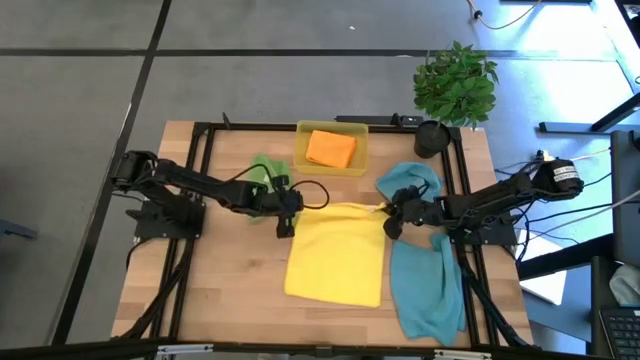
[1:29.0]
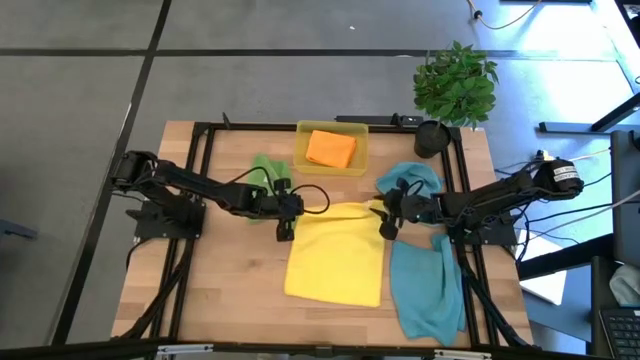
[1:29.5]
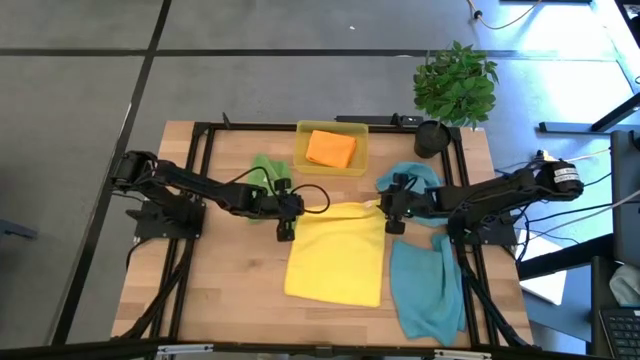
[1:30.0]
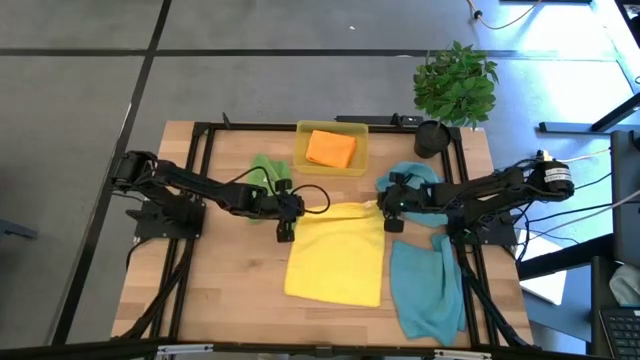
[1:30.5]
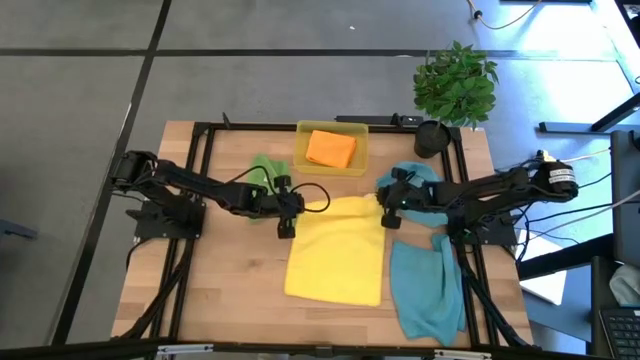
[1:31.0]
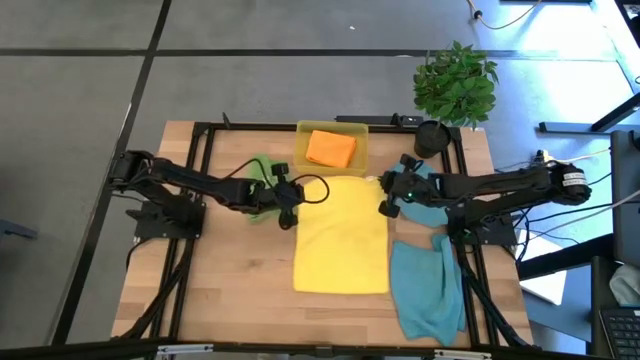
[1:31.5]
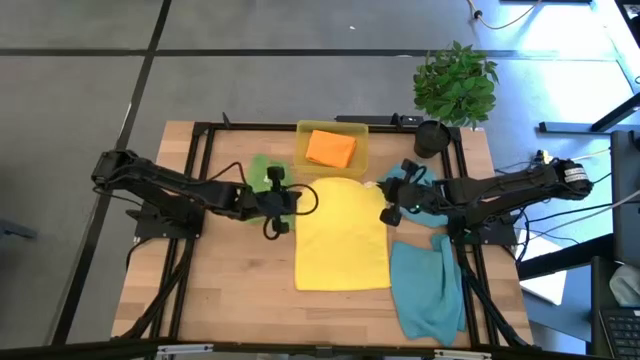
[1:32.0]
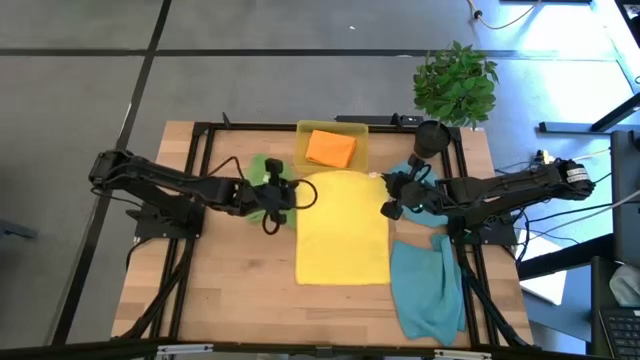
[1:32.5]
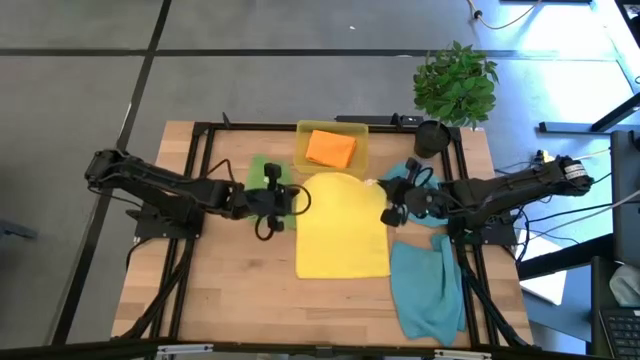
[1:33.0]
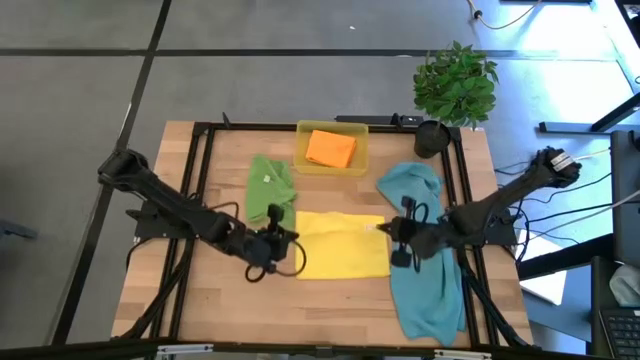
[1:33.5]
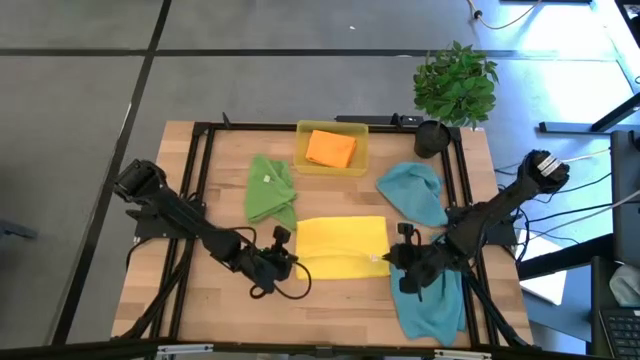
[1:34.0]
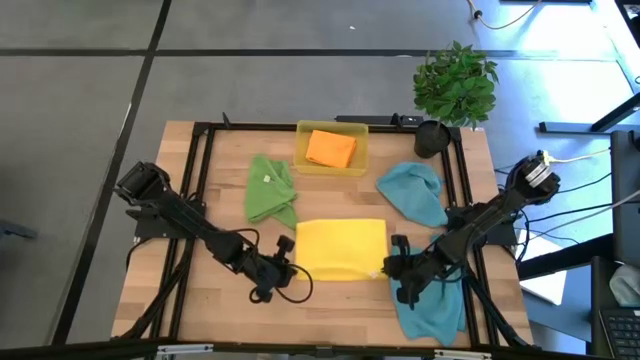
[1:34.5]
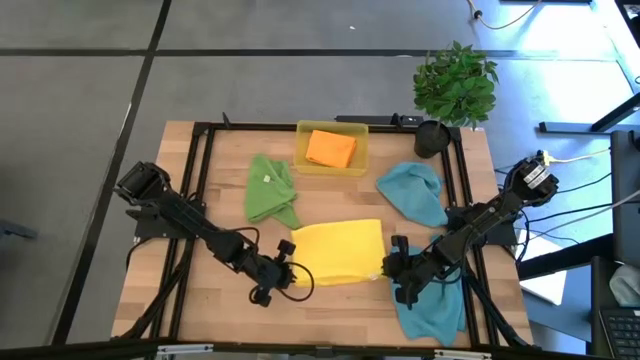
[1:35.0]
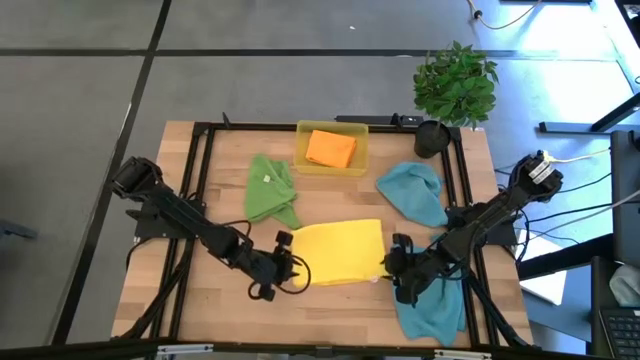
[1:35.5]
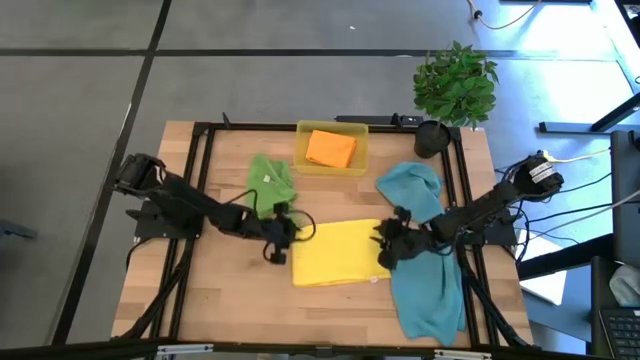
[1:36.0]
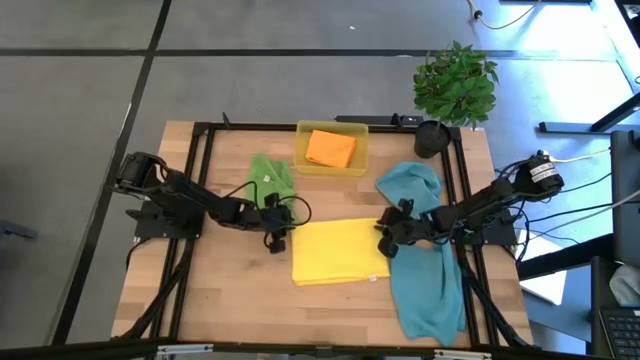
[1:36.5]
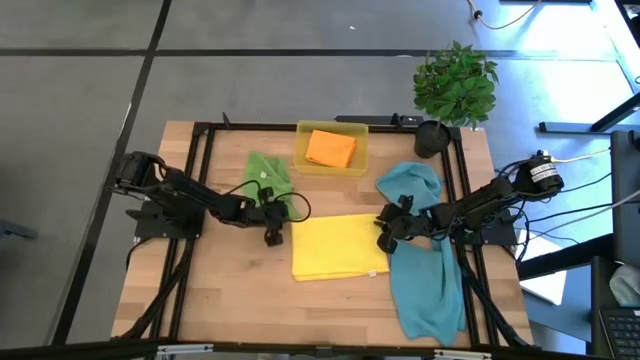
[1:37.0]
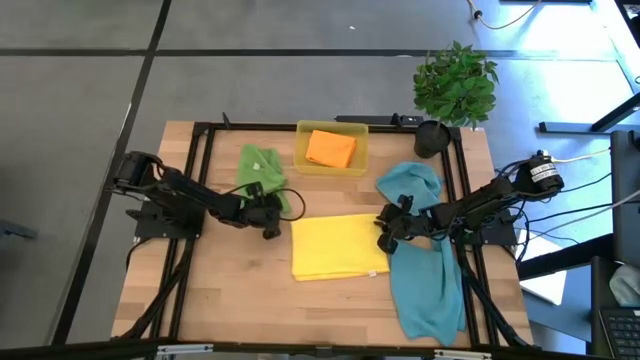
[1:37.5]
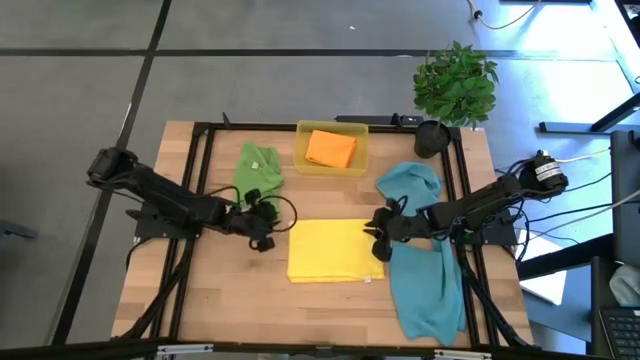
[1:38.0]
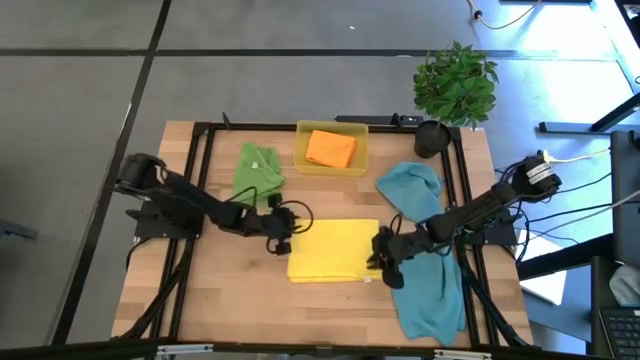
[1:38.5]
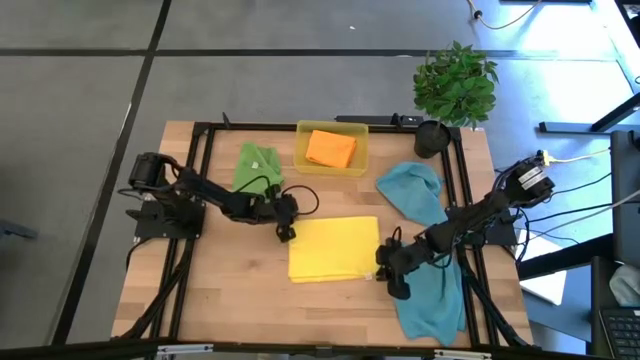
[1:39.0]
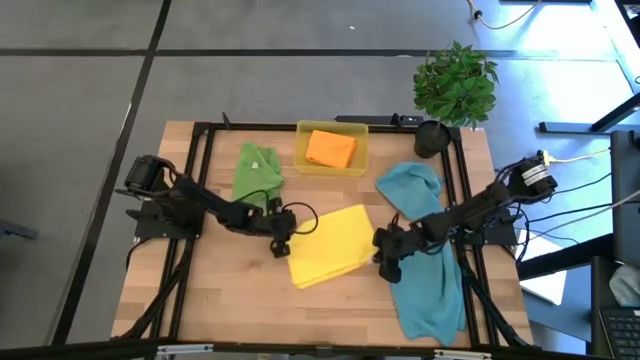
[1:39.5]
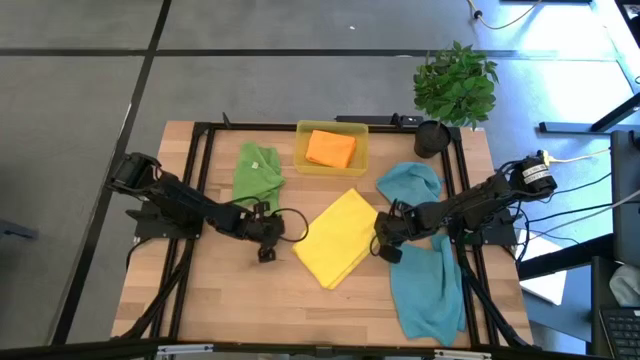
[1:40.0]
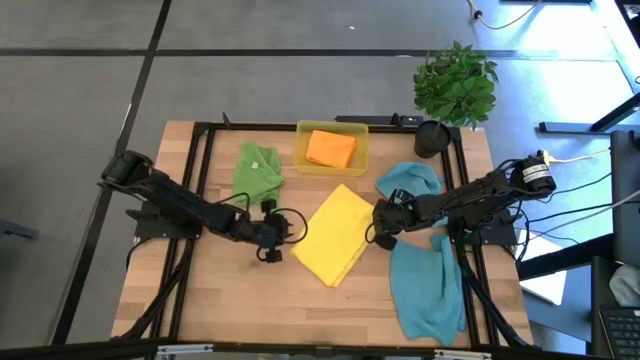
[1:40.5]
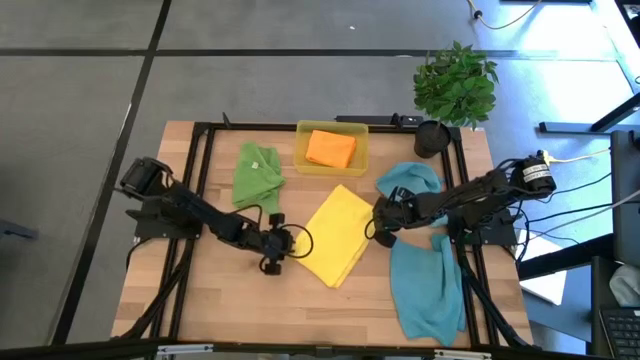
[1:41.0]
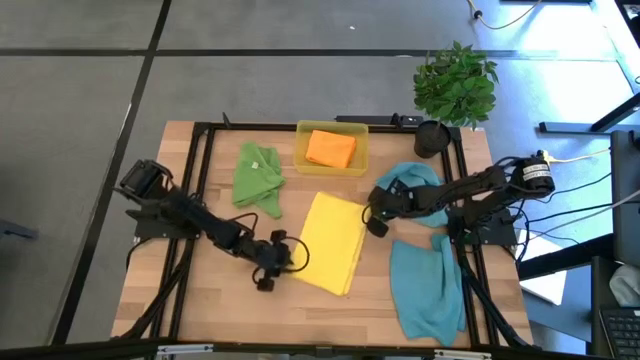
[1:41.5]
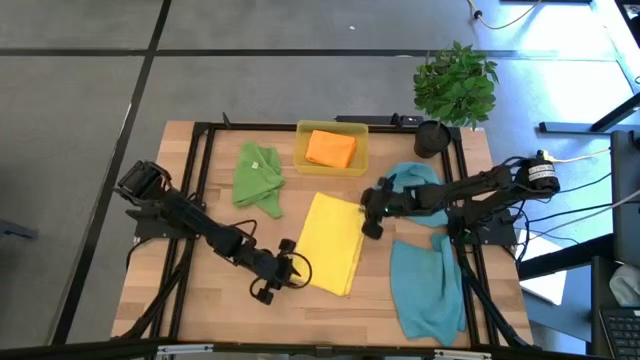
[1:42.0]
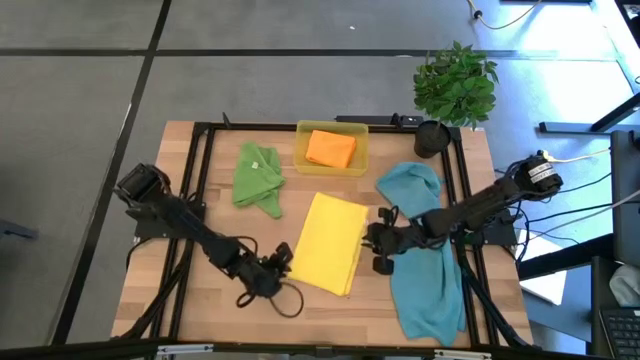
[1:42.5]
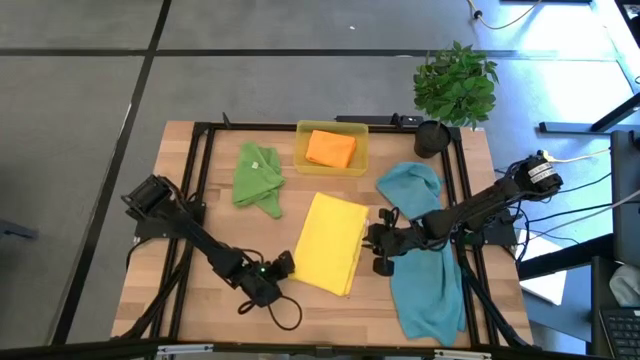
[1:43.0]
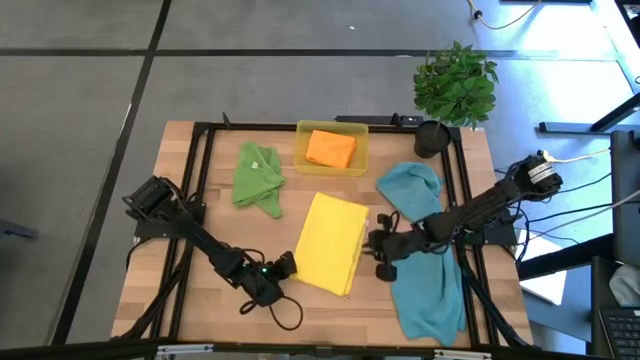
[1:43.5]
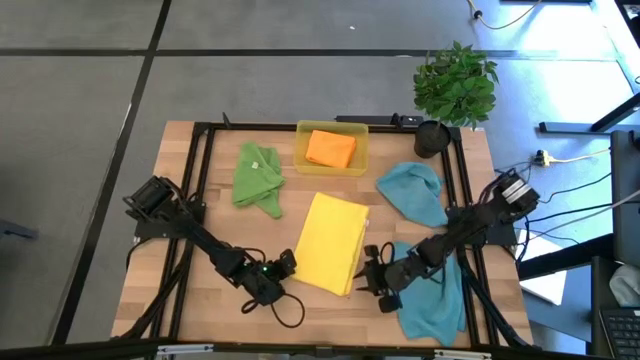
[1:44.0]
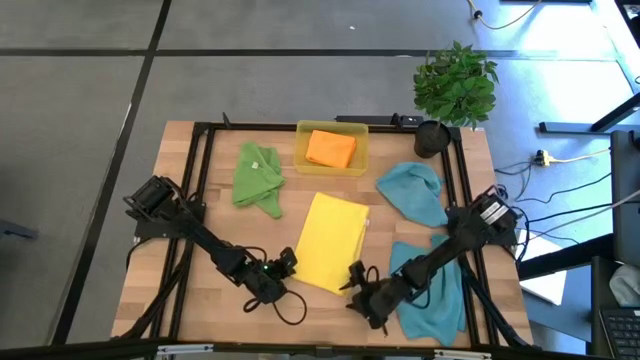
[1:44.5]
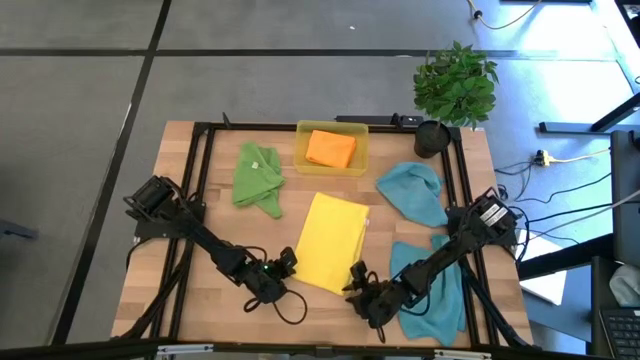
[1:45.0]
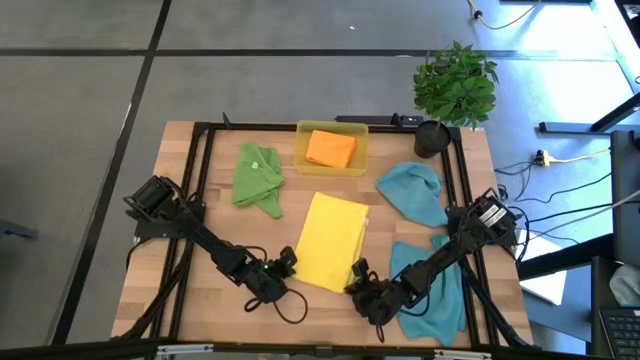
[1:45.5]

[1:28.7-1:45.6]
Task: Fold microfiber towels
Fold the yellow microfiber cloth

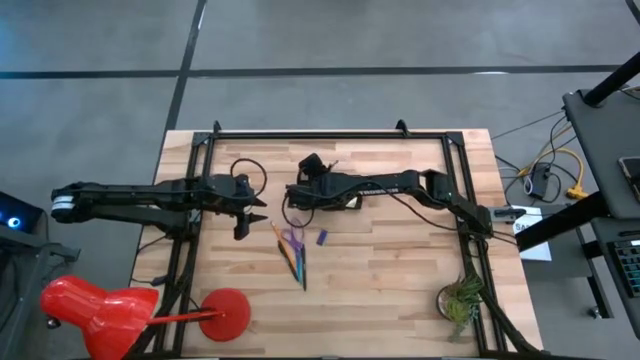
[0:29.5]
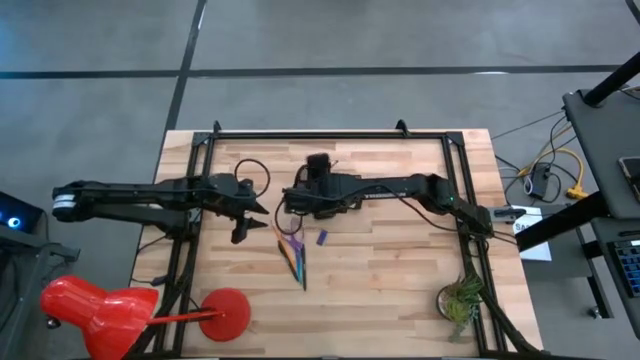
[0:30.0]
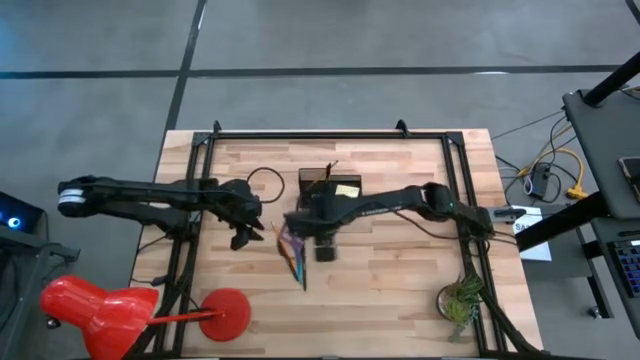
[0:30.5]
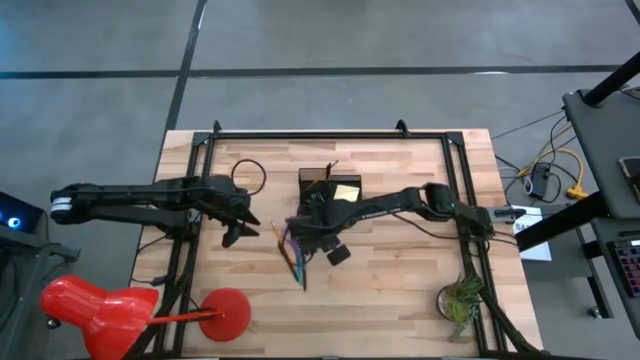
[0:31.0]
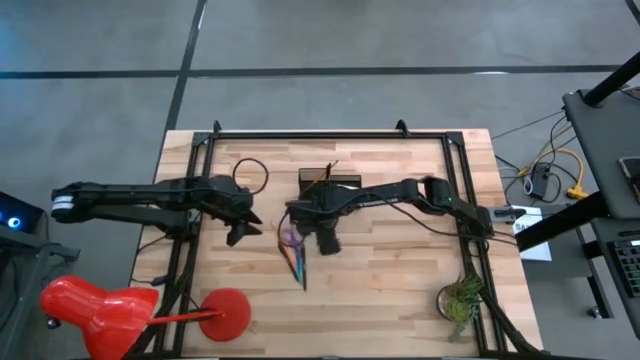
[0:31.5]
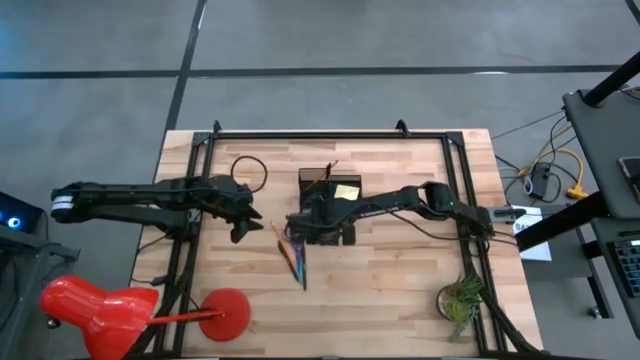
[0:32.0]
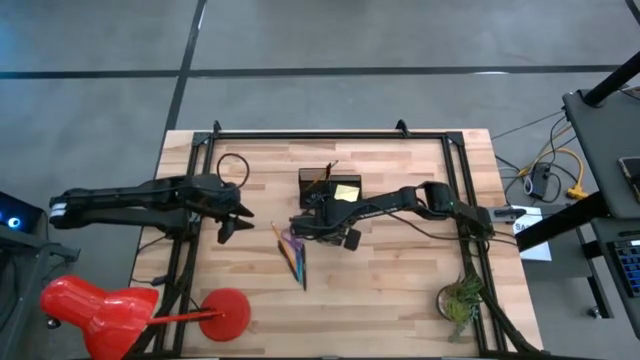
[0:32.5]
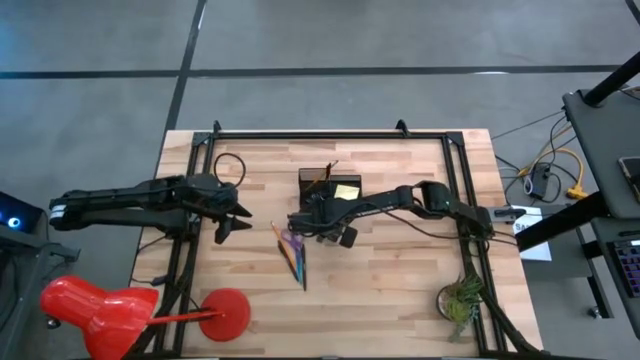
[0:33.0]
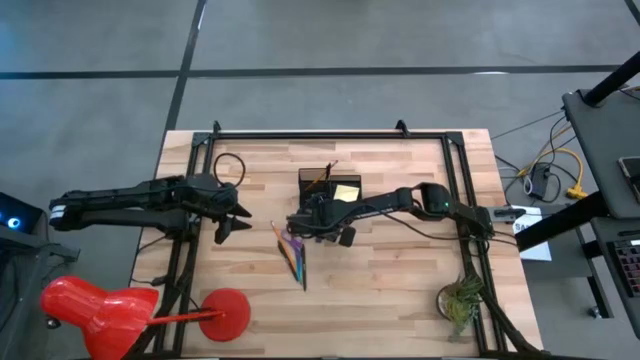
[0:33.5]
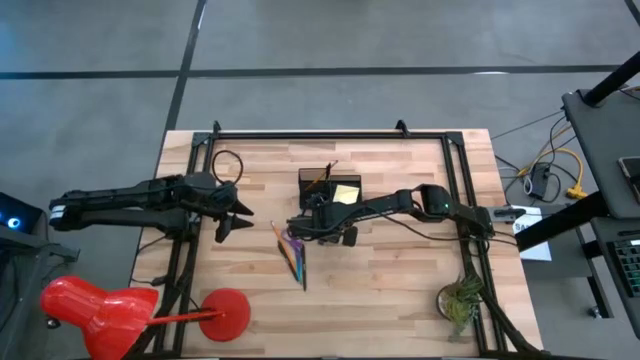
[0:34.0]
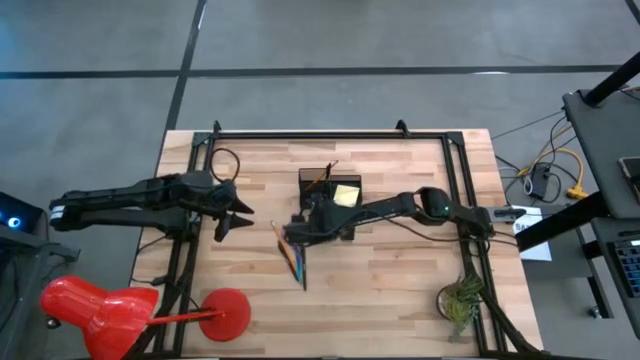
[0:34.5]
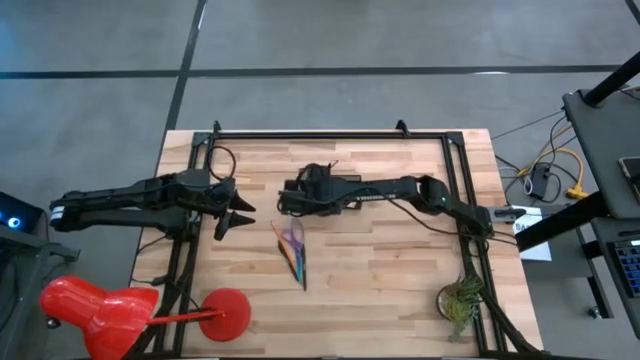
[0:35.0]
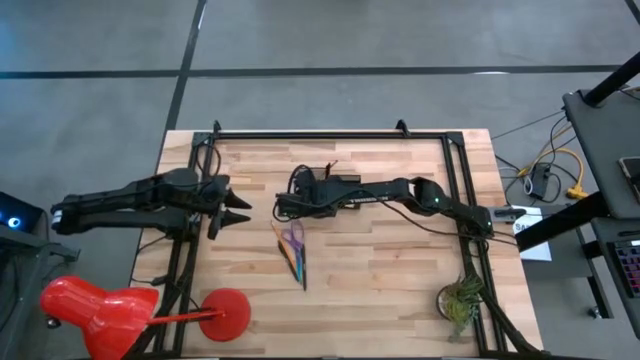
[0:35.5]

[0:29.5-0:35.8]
Task: Pick and place office supplies into organizer
Put the blue eraser into the black desk organizer
